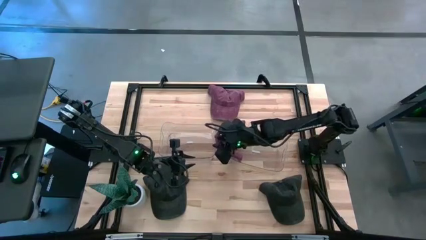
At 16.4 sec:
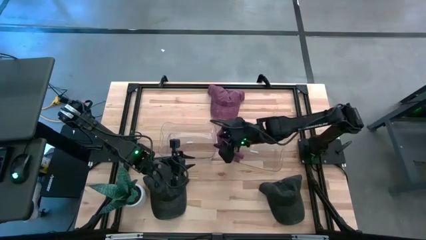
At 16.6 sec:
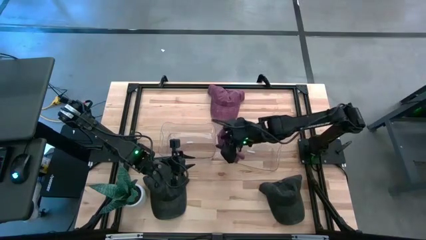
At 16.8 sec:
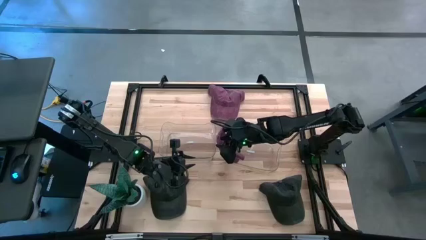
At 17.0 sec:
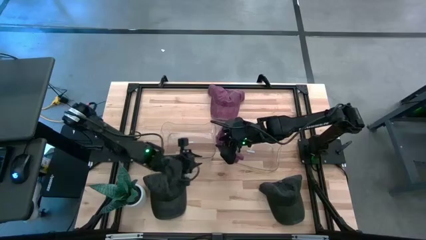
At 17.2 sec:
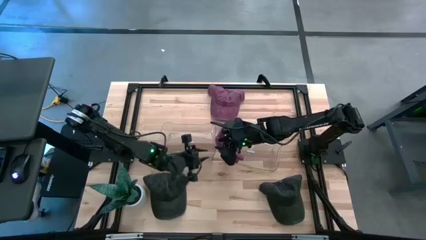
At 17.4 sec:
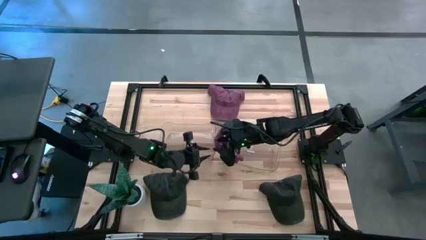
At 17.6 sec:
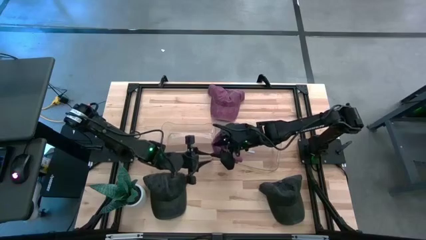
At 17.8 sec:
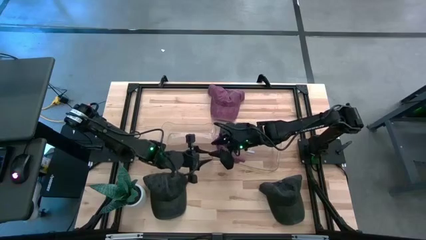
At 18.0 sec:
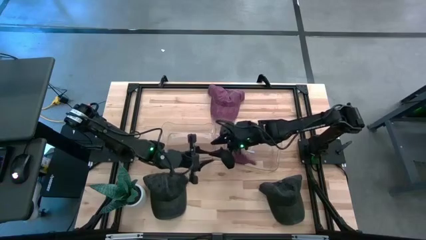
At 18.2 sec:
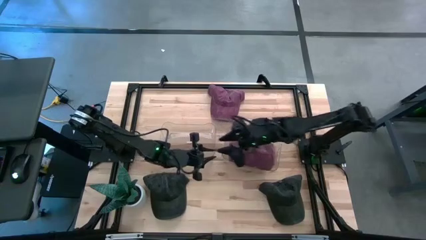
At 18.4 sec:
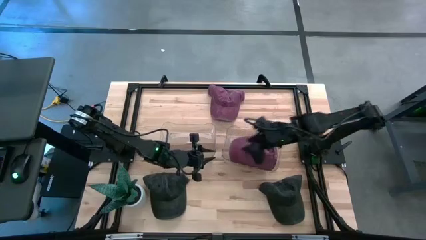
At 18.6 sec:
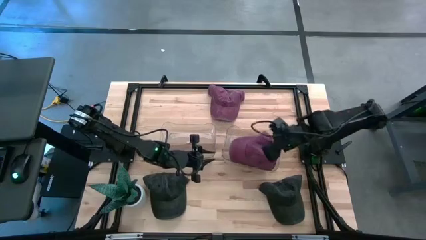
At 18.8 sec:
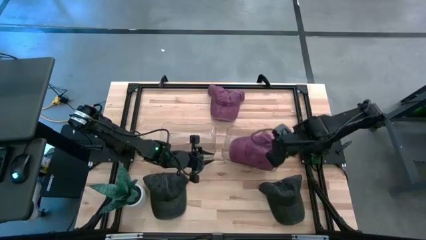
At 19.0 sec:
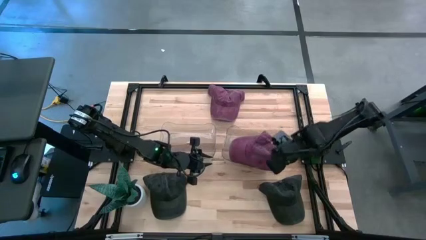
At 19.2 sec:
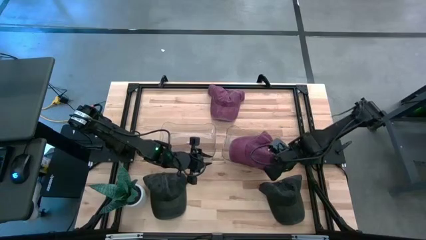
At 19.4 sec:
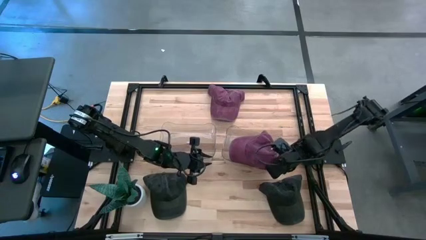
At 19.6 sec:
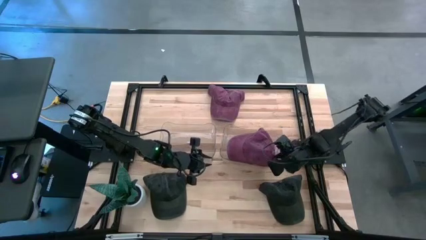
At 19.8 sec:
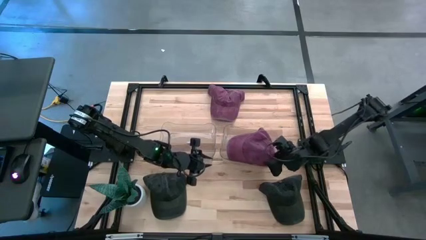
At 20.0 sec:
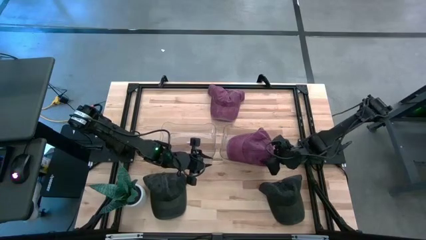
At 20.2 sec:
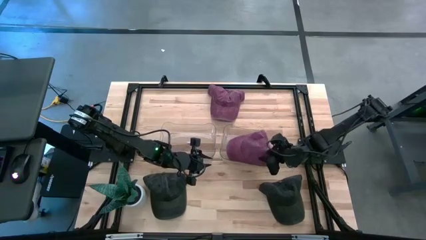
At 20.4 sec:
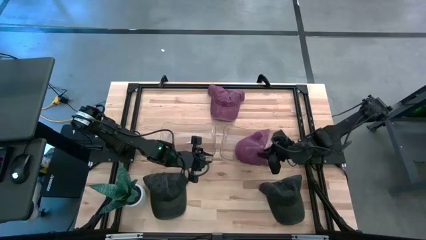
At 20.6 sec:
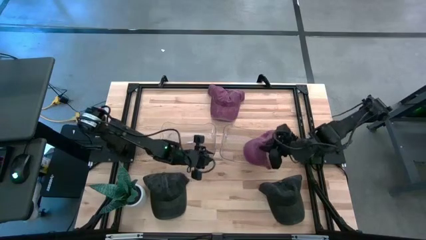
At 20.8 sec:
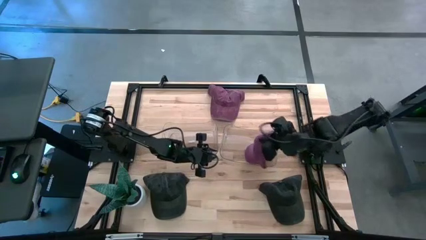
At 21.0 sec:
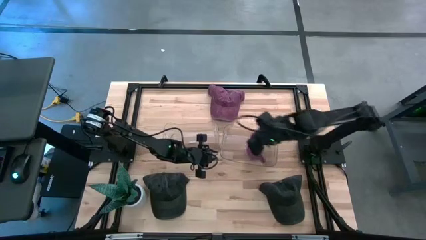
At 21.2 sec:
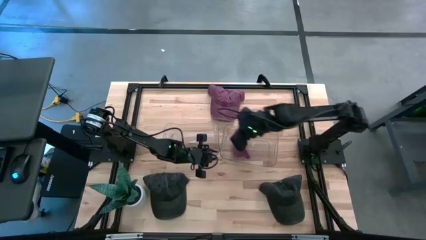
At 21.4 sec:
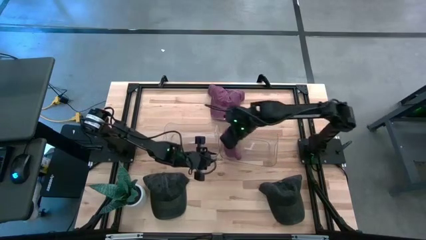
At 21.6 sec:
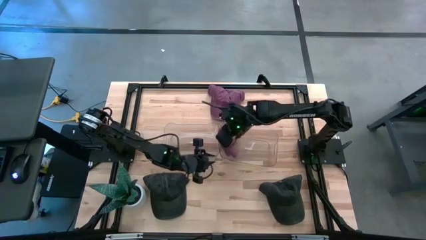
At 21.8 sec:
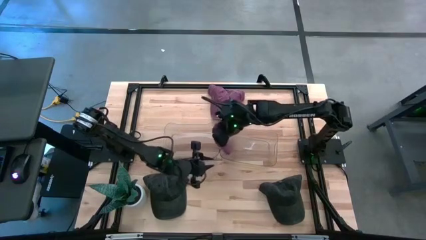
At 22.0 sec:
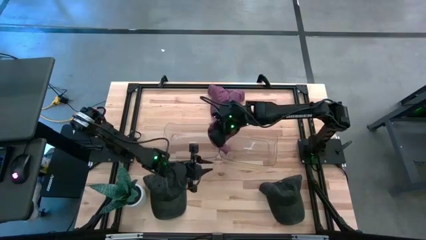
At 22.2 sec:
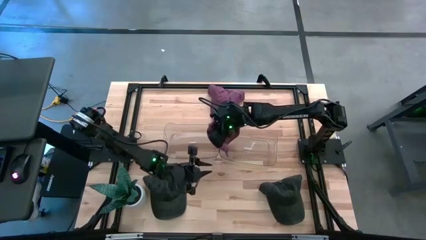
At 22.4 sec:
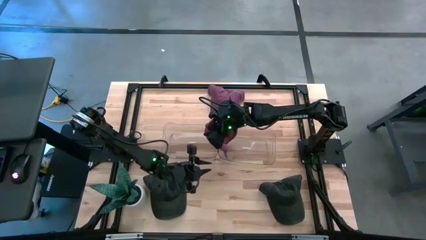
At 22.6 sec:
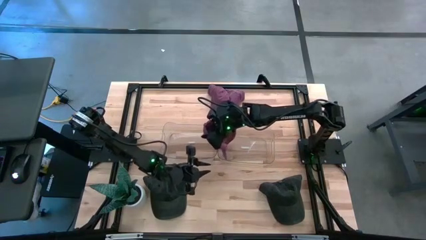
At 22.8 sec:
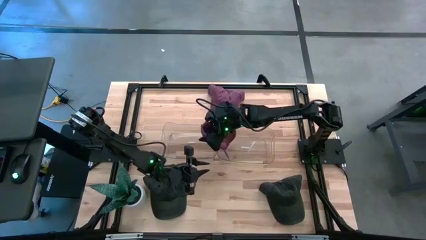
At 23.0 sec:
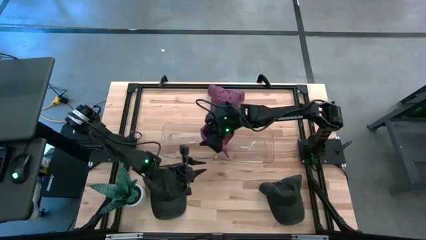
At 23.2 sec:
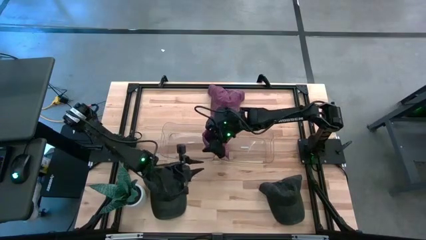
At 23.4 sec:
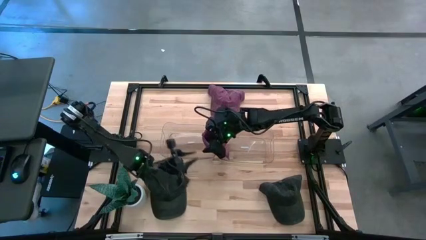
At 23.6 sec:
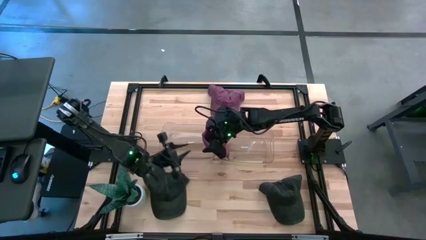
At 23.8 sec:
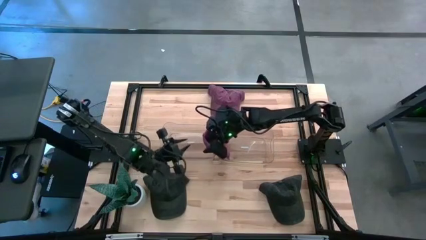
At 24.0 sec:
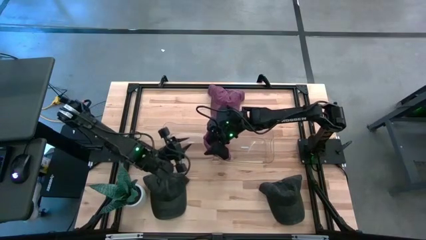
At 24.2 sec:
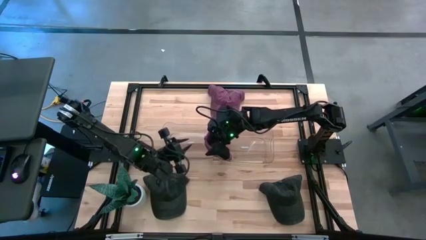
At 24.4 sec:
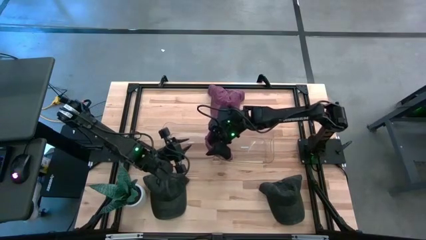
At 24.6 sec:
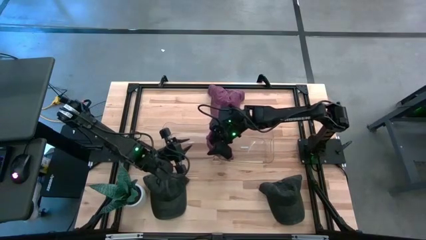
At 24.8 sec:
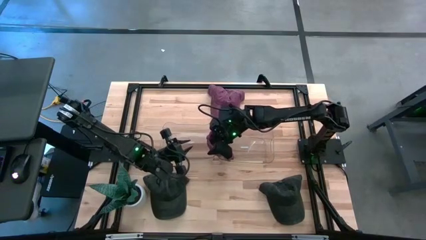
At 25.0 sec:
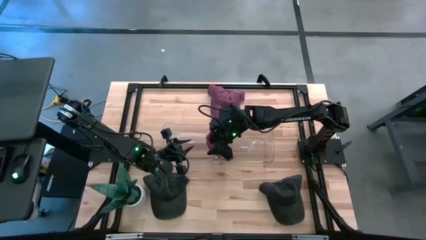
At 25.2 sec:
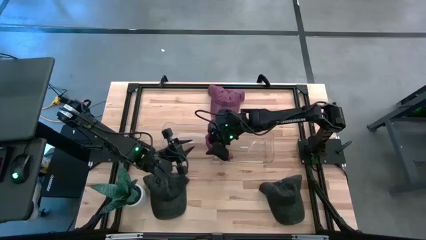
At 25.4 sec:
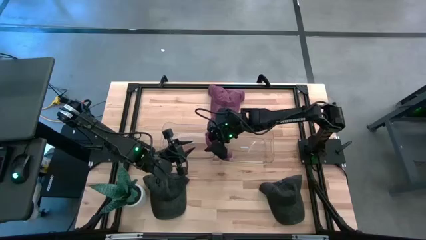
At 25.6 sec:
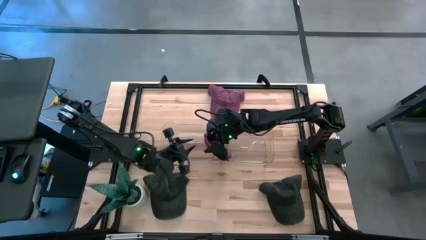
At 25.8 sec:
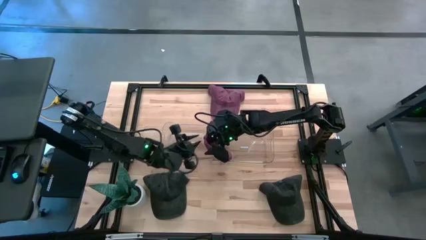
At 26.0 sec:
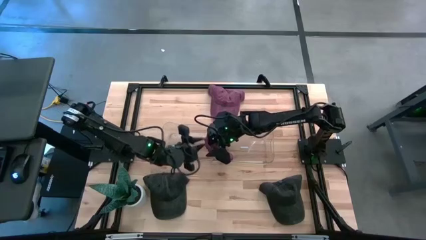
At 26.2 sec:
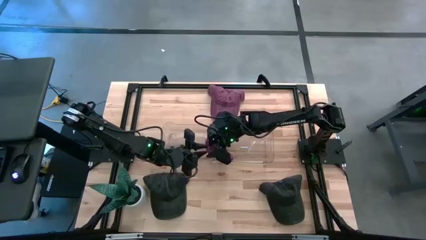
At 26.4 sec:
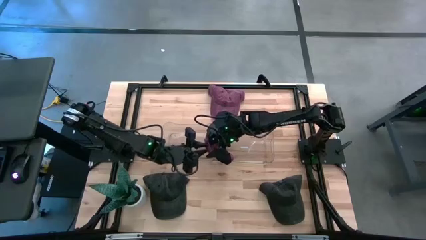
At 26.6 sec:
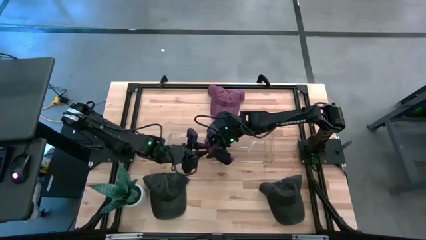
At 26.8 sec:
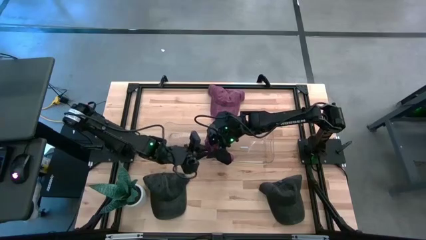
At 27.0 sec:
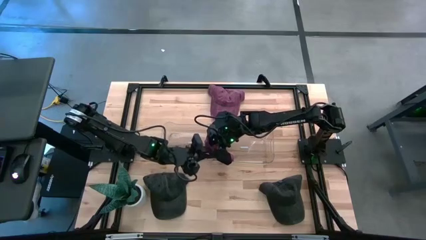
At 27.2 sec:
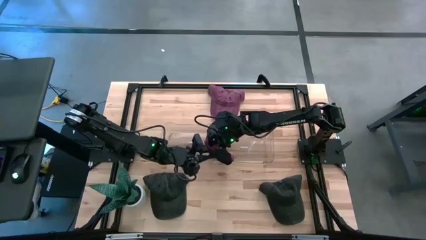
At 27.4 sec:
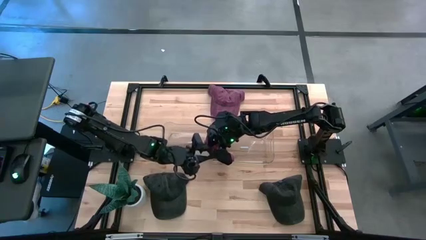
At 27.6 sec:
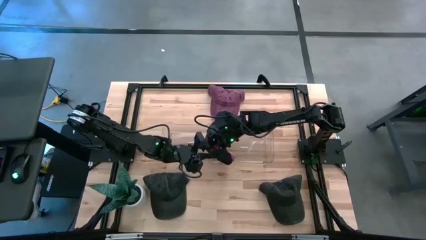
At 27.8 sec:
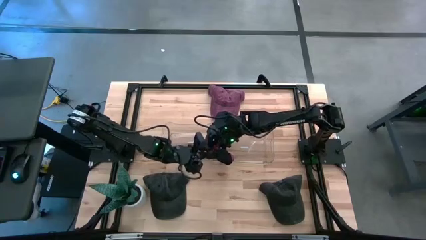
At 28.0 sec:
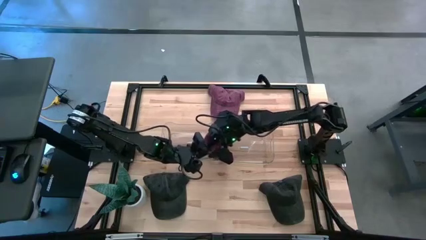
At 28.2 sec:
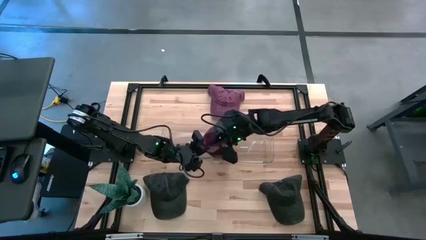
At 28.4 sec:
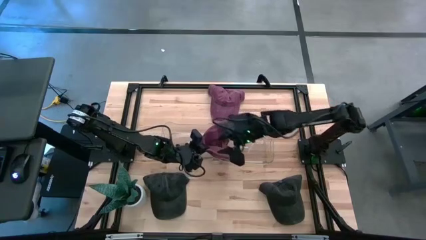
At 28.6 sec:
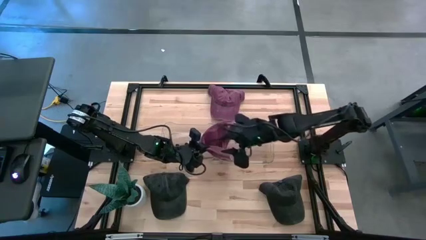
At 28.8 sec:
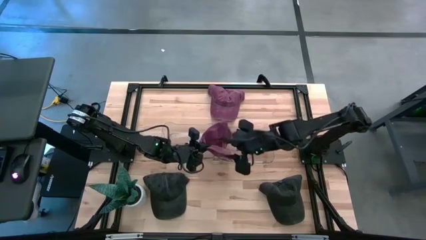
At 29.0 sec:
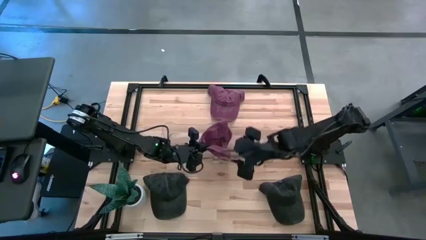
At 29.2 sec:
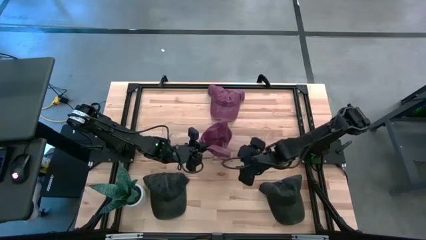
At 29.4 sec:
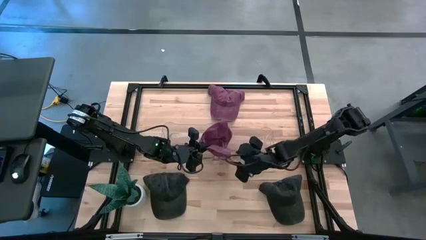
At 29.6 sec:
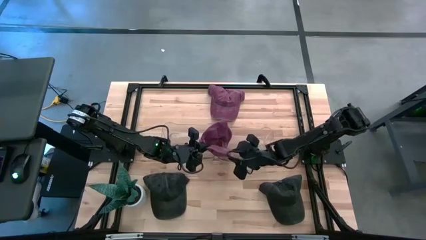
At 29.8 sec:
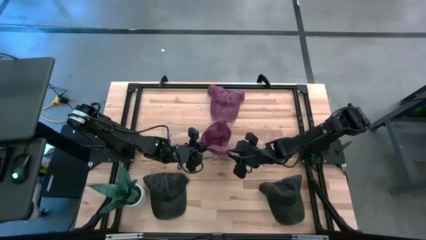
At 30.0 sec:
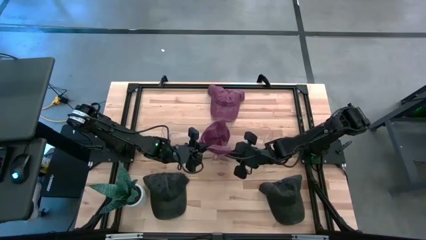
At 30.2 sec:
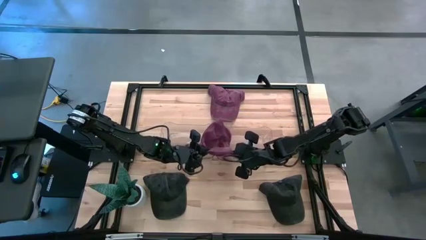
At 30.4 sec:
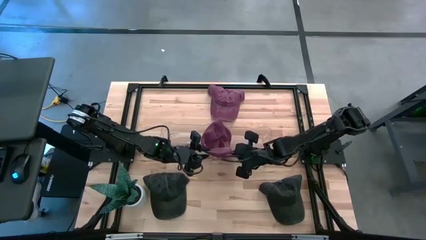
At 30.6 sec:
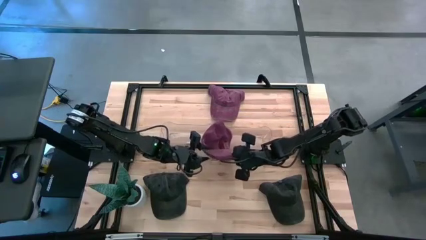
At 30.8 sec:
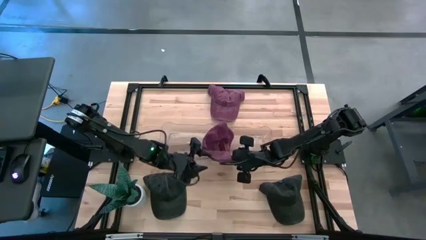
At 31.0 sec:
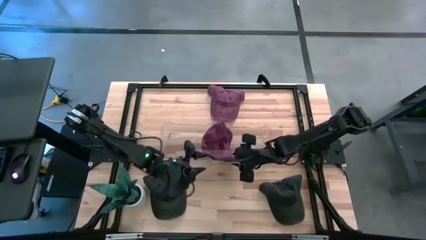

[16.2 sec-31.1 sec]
Task: Pick & Place hat
Put the bottom red cap into the right transparent bin
